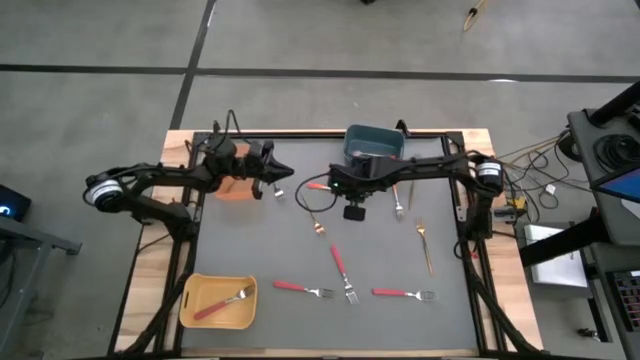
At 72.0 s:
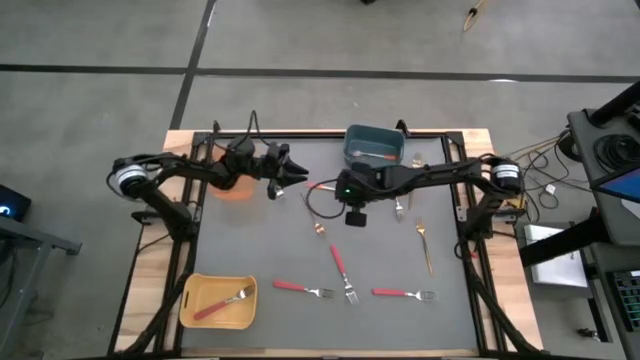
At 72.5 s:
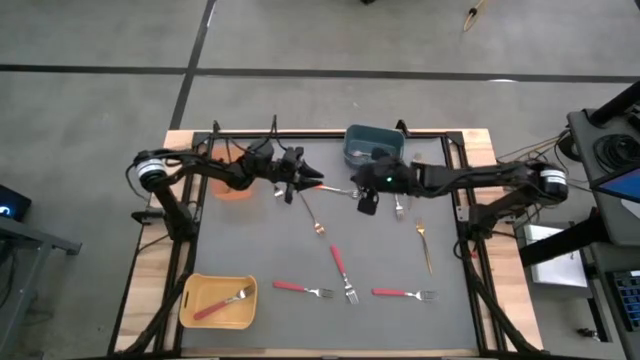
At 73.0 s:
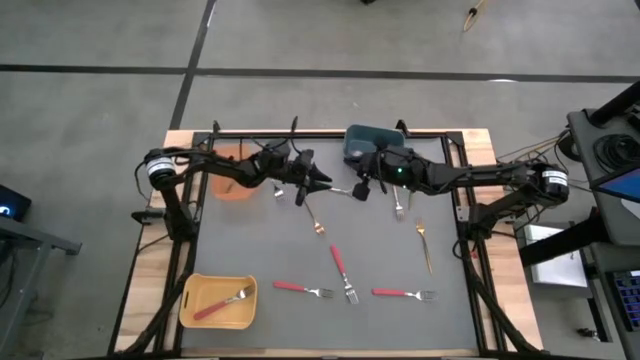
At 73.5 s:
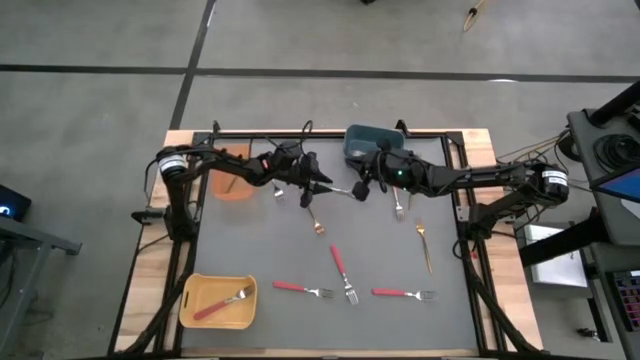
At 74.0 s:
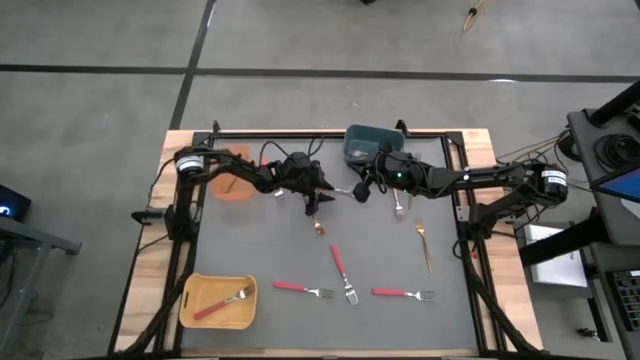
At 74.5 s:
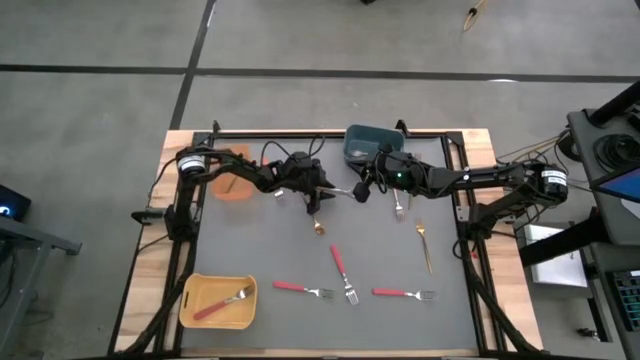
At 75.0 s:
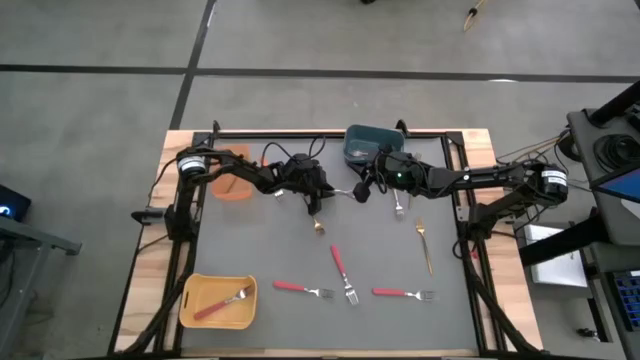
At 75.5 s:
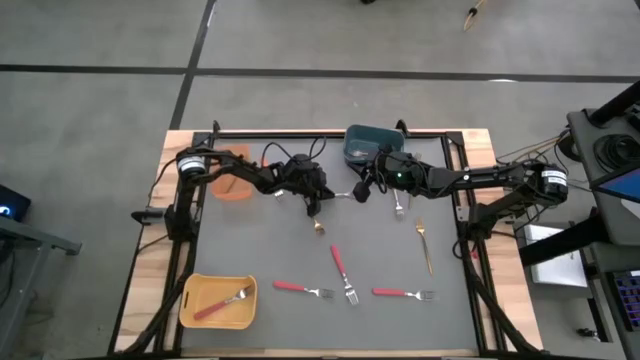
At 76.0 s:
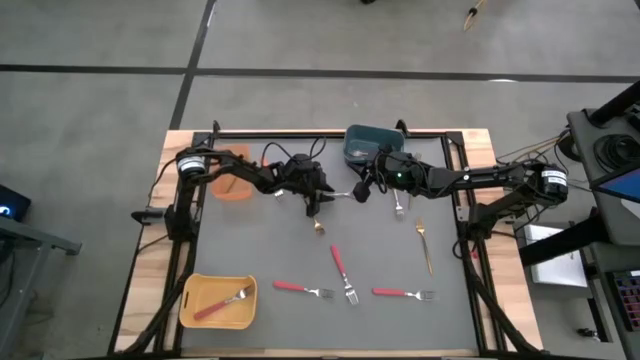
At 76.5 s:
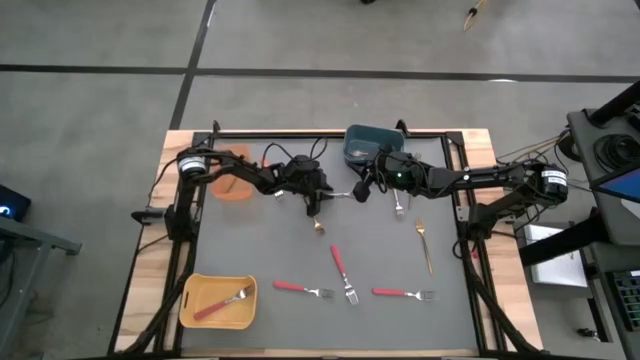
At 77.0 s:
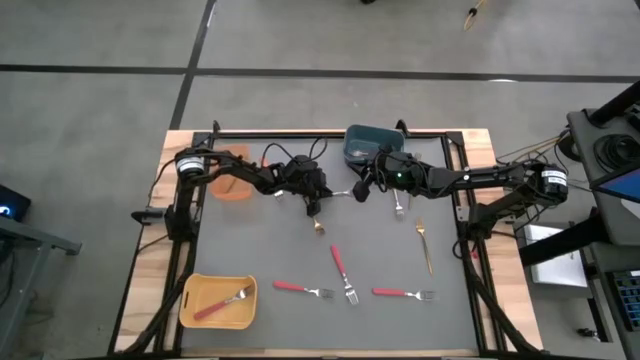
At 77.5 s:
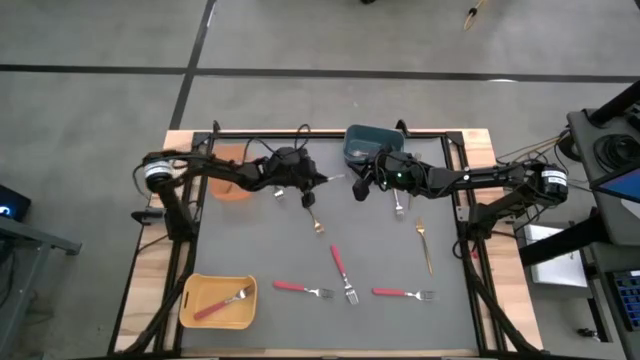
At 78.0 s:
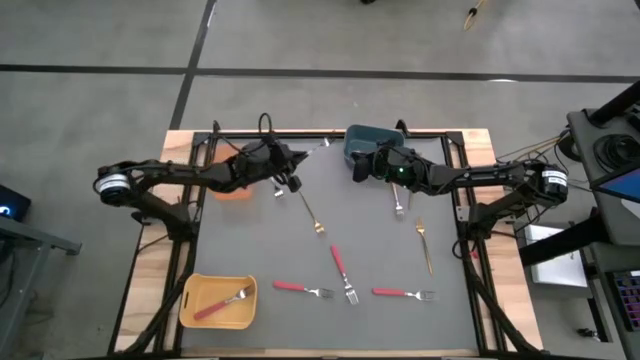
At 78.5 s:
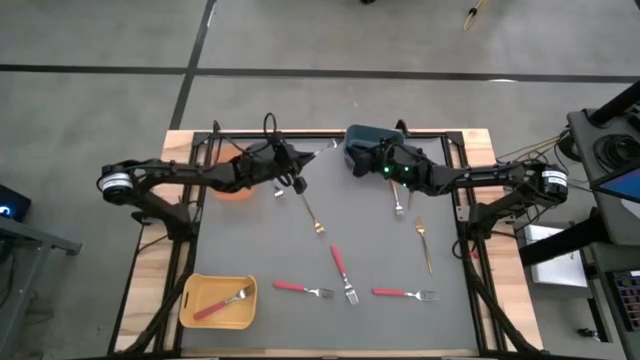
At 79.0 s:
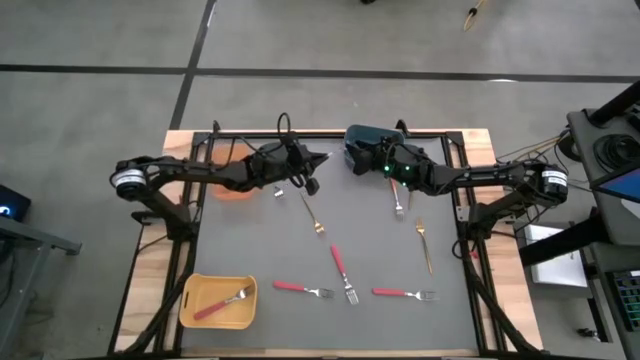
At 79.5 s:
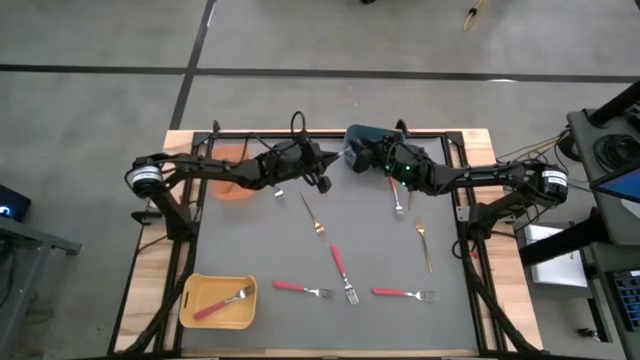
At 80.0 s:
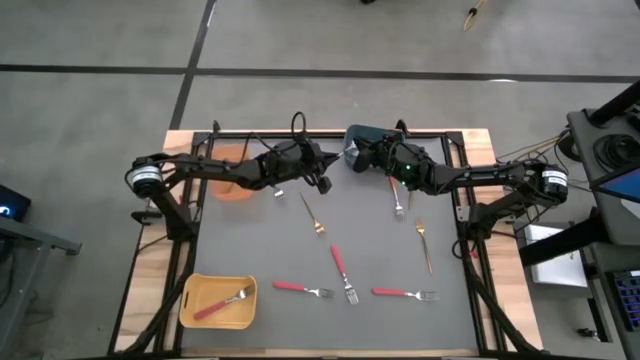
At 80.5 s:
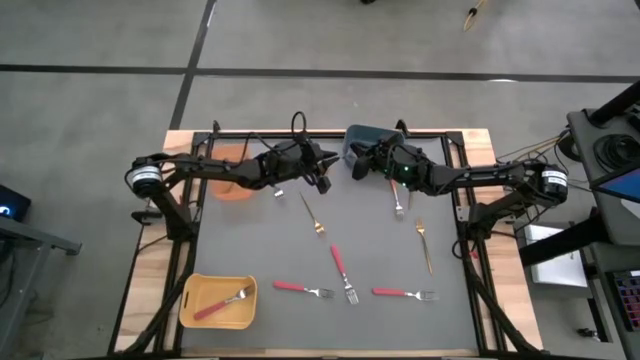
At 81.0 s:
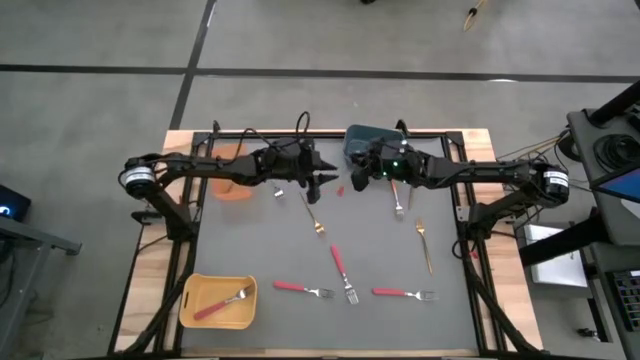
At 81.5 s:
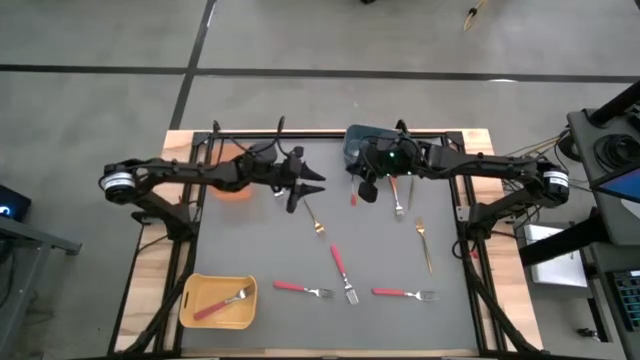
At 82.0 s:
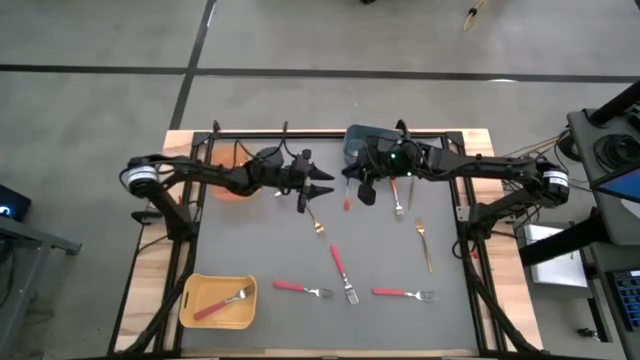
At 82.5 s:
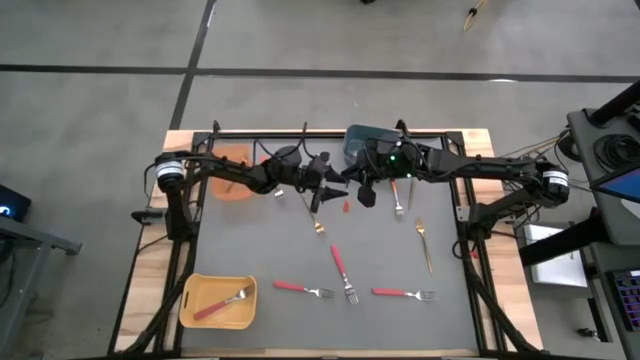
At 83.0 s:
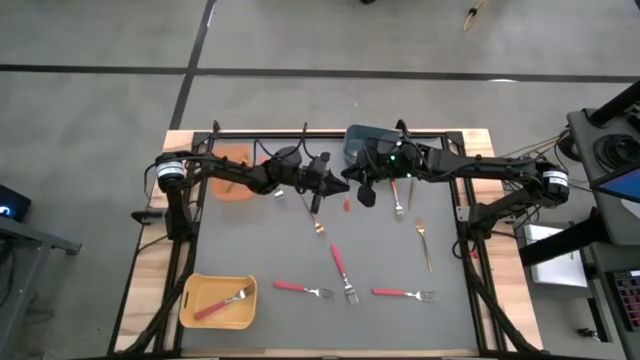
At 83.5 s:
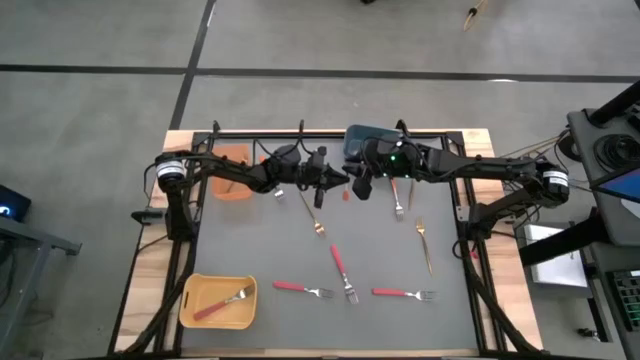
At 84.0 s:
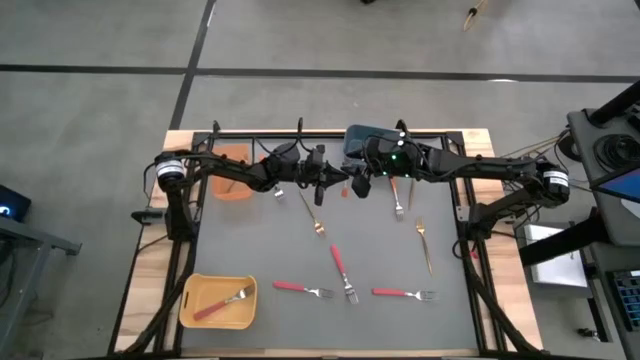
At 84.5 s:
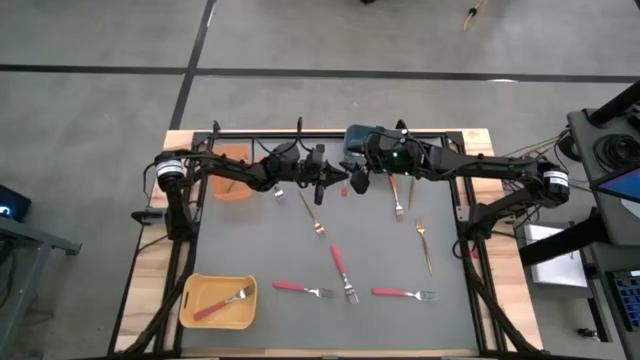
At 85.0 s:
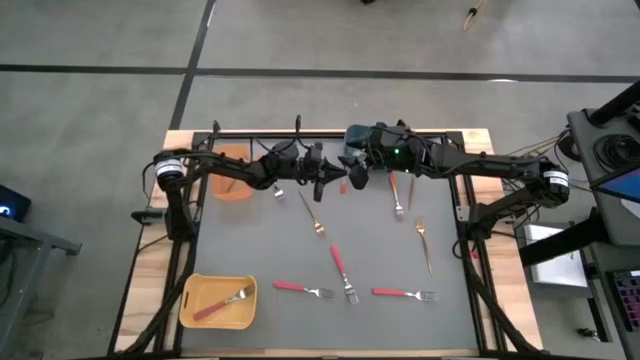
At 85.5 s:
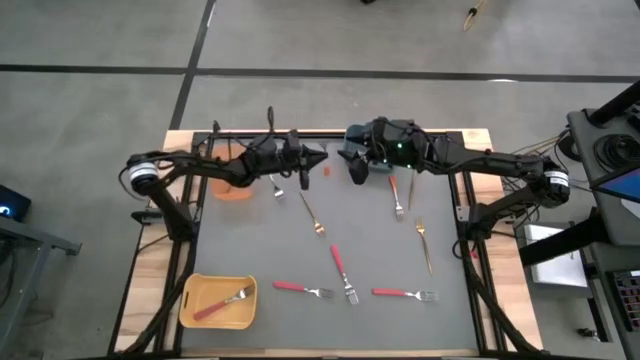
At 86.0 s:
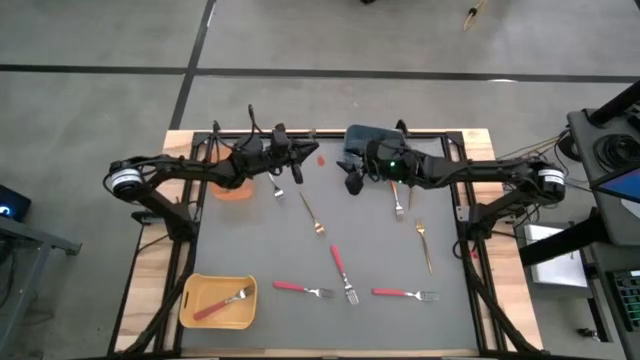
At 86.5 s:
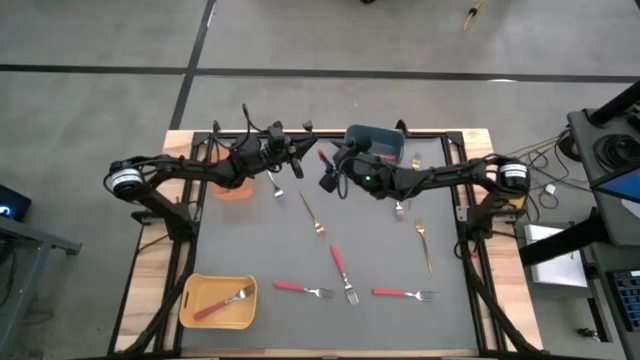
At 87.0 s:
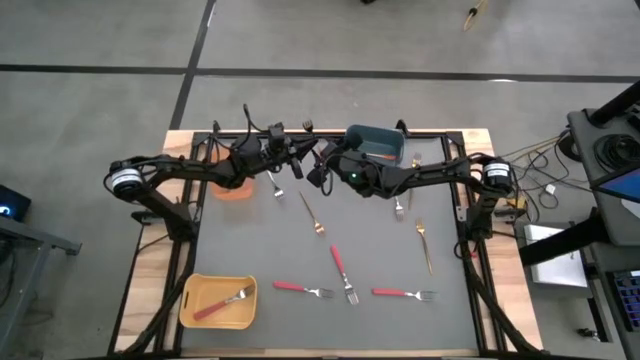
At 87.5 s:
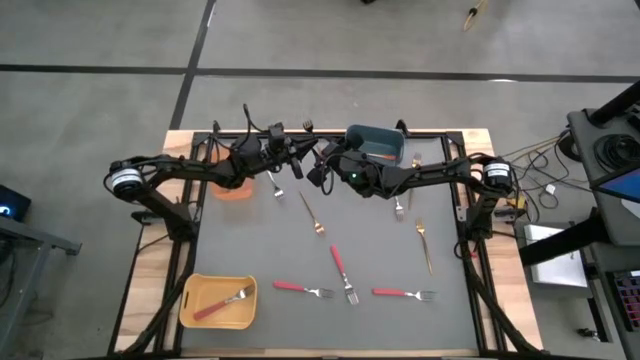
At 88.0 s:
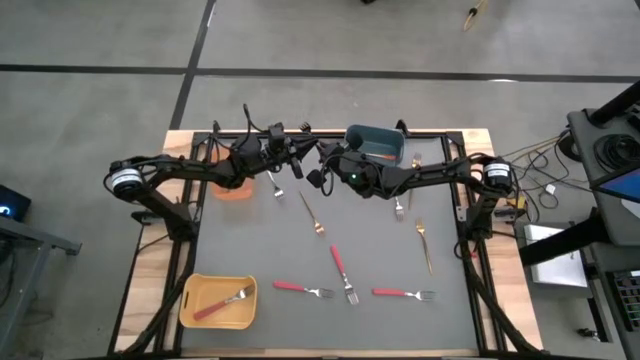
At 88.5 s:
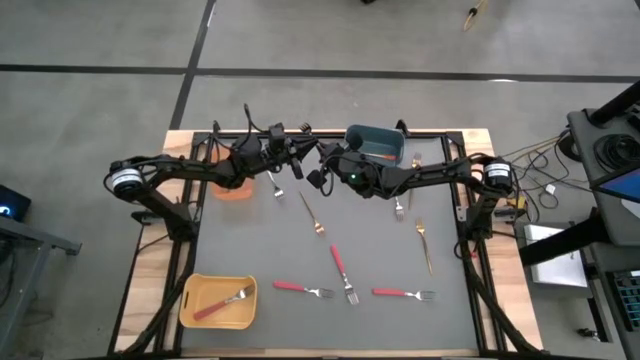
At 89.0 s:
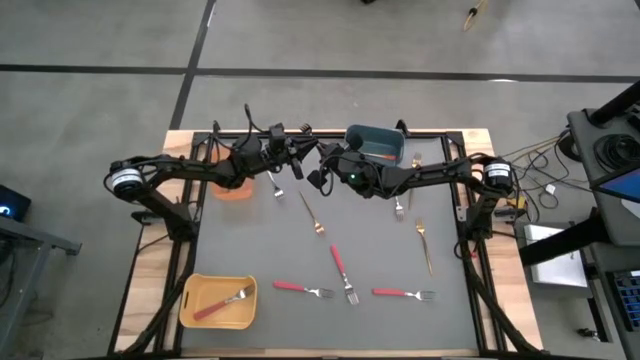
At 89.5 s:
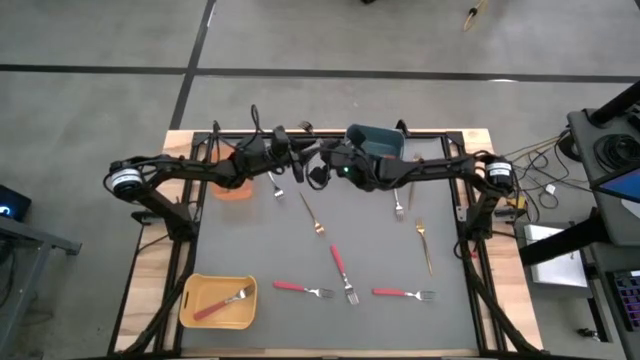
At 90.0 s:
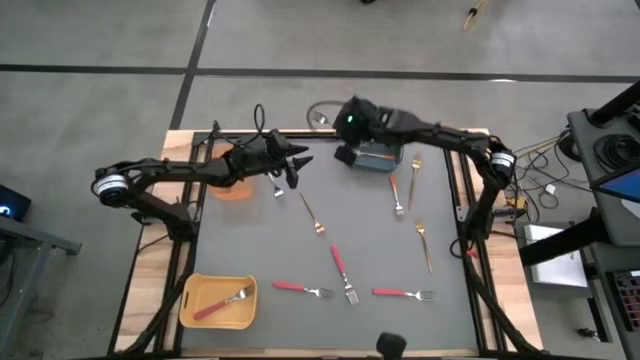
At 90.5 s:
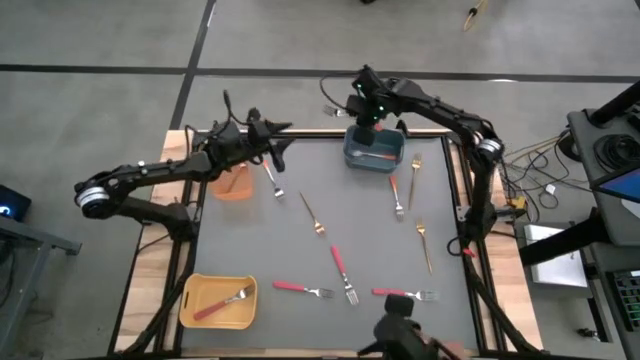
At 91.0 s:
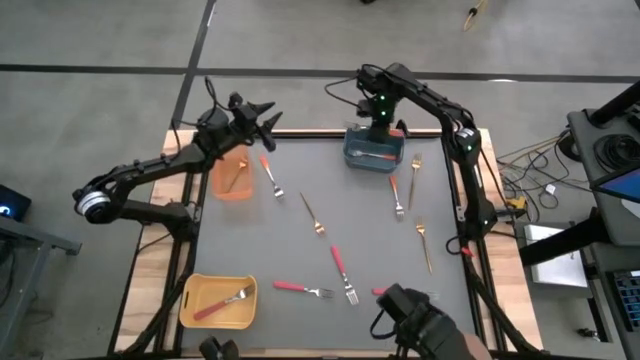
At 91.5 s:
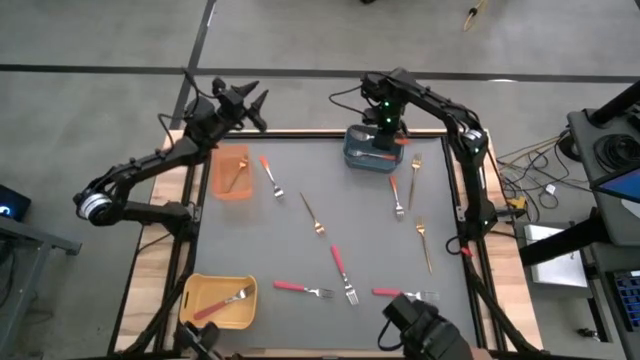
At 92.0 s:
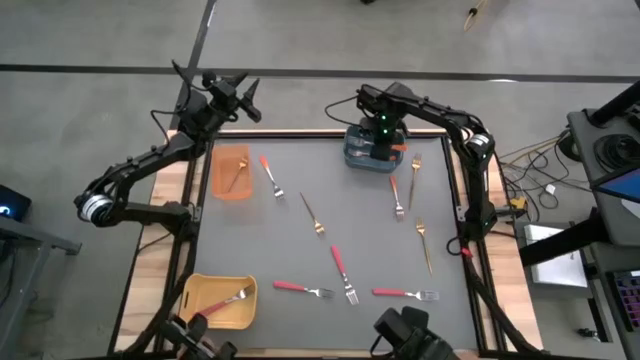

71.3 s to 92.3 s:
Task: Sort silverware by color (type)
Put the orange fork into the blue bin

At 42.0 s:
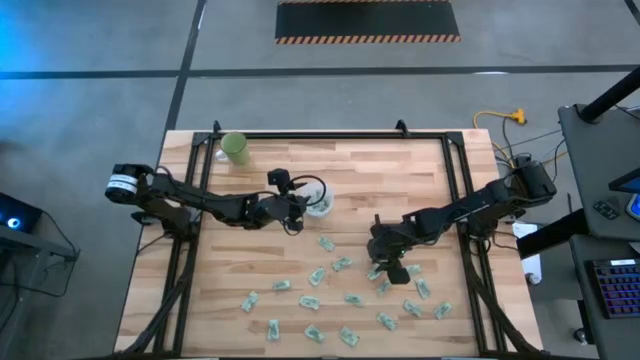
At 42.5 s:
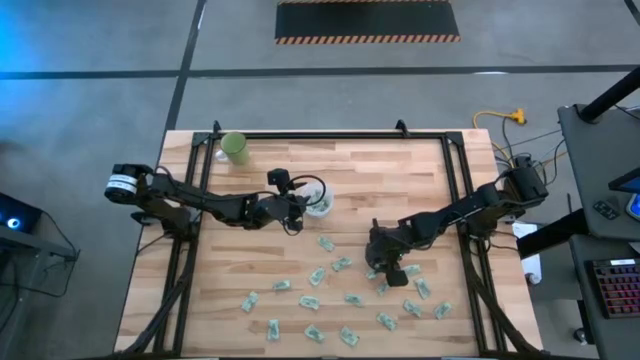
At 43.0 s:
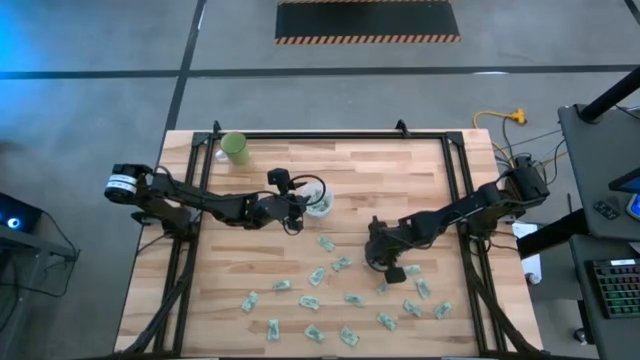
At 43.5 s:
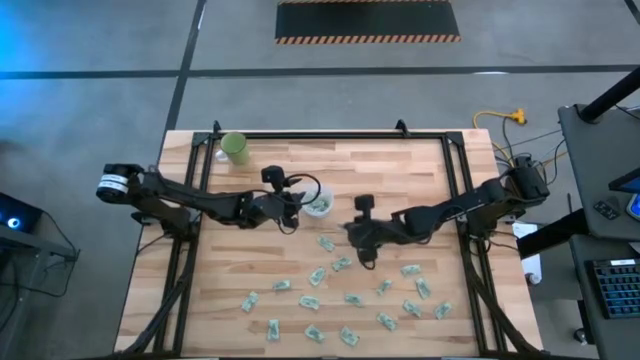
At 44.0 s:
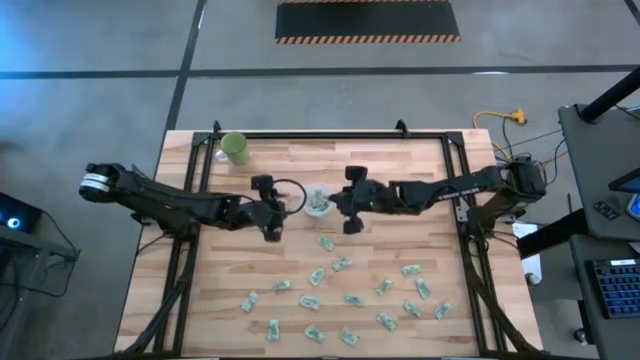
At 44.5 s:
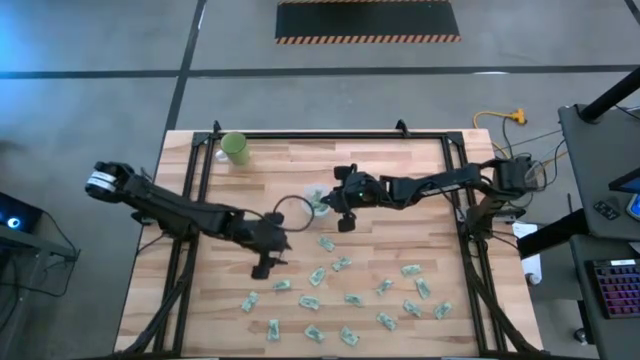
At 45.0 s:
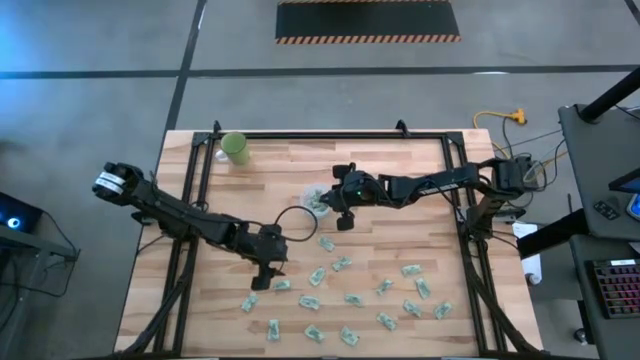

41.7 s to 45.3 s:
Task: Pick and place Stevia / Truvia into bins
Put the green stevia packet into the transparent container
